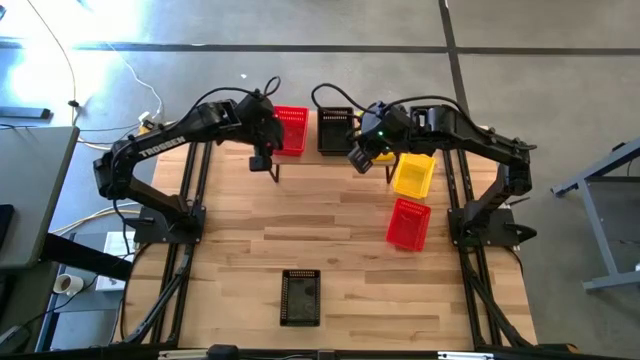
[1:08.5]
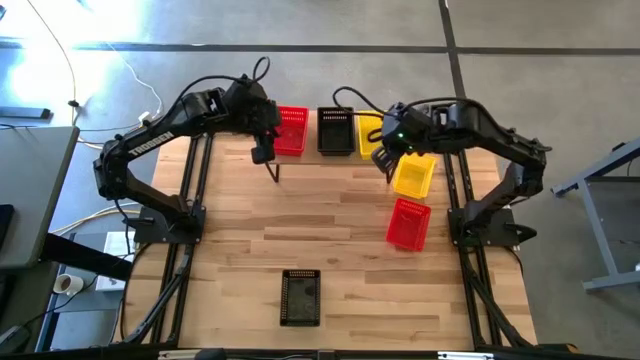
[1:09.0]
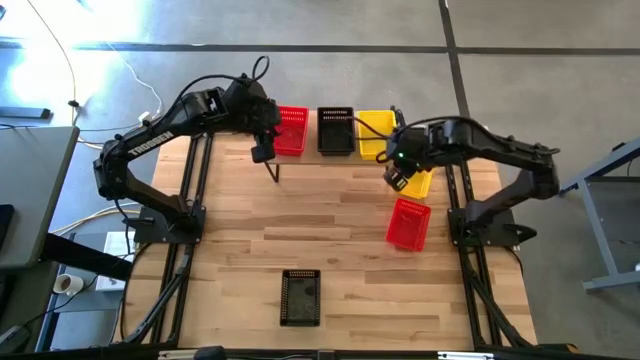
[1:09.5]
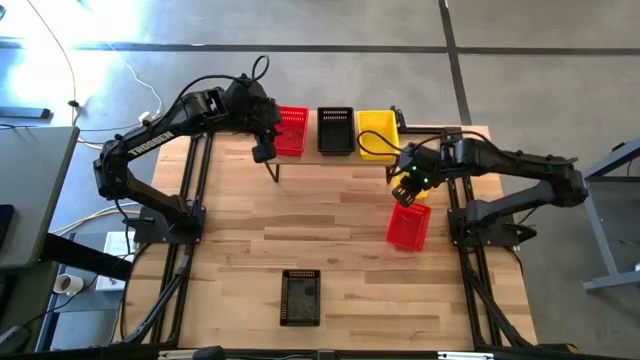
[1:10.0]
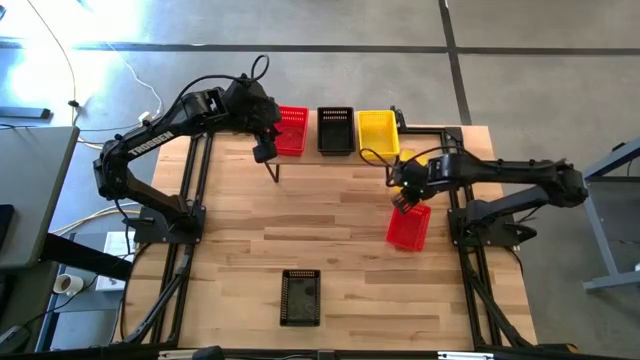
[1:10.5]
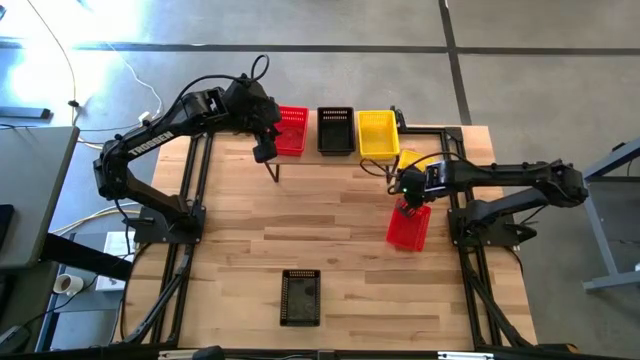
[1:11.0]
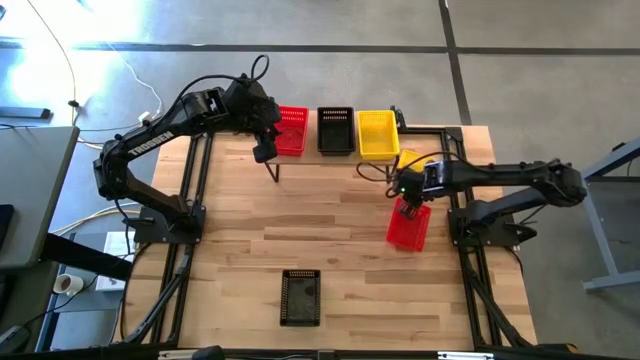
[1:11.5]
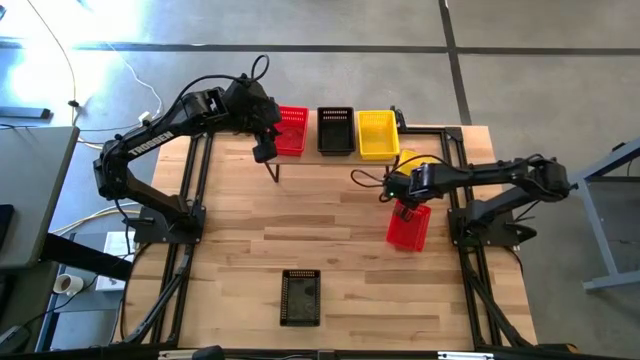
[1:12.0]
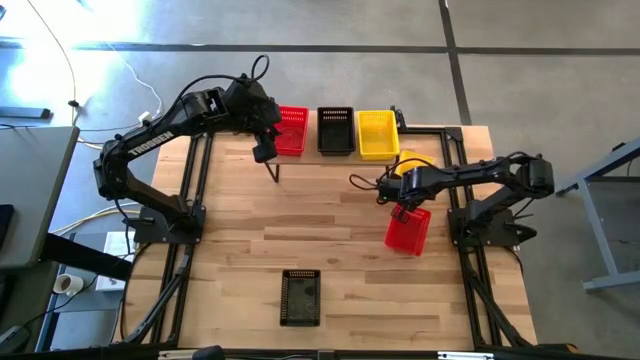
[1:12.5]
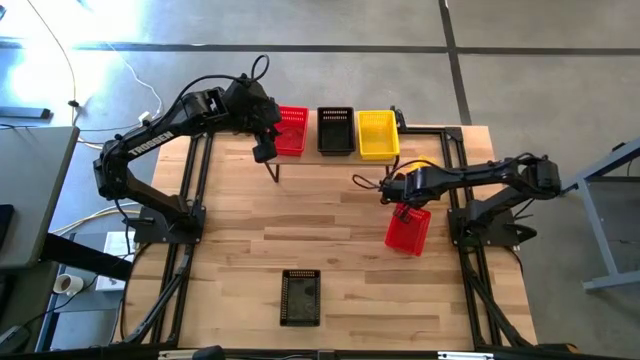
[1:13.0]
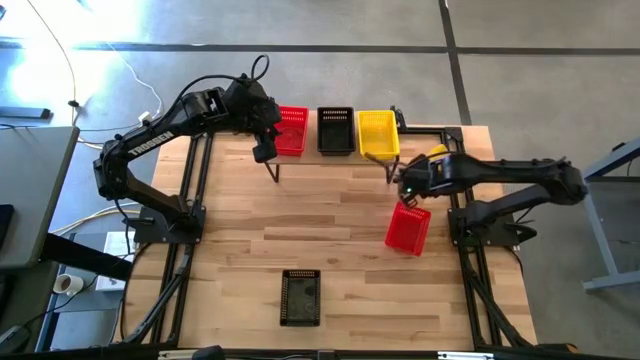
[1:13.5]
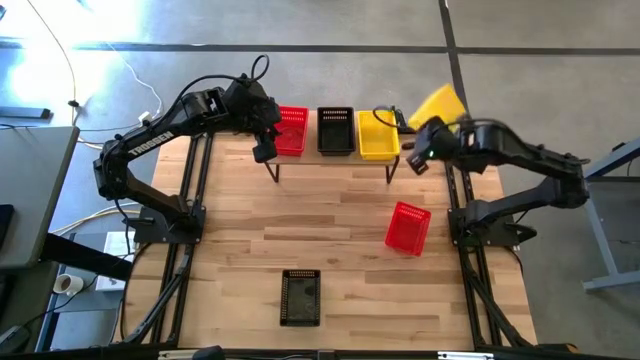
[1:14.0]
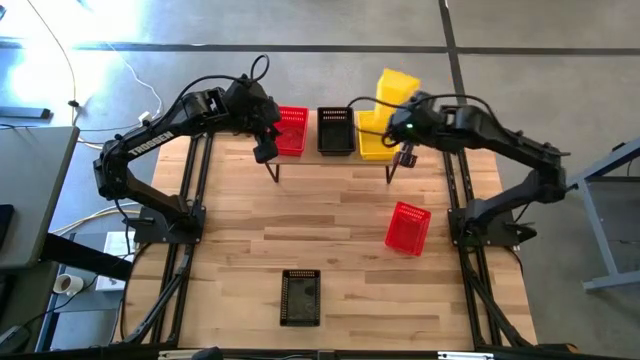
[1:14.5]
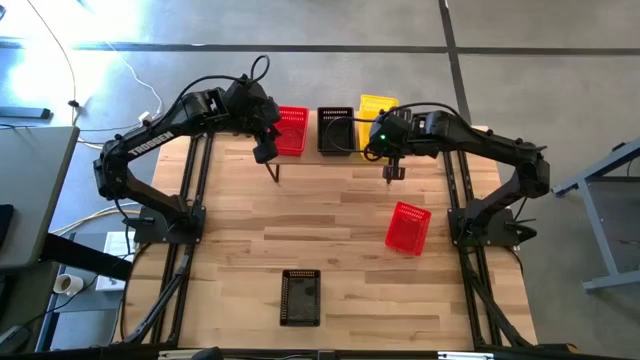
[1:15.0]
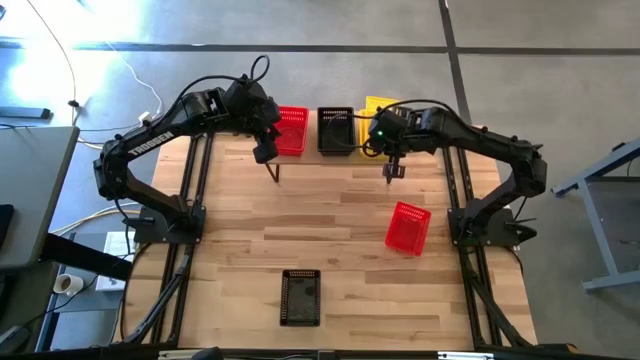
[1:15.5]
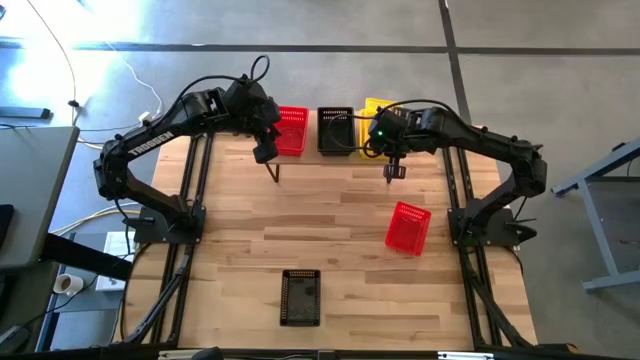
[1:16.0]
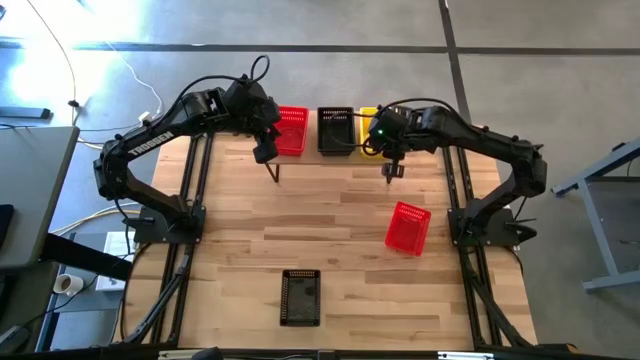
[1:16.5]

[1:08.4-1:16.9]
Task: Stack baskets on shelf by color
Stack the yellow bin on the top of the yellow bin on the shelf

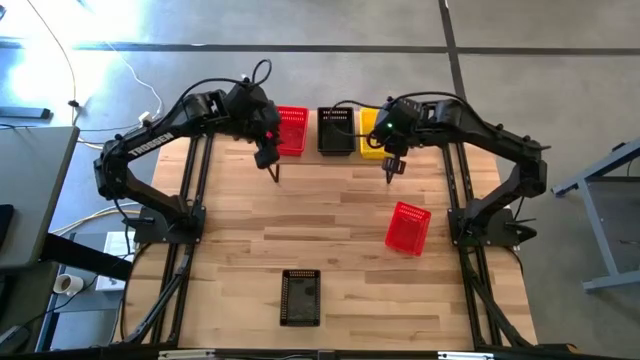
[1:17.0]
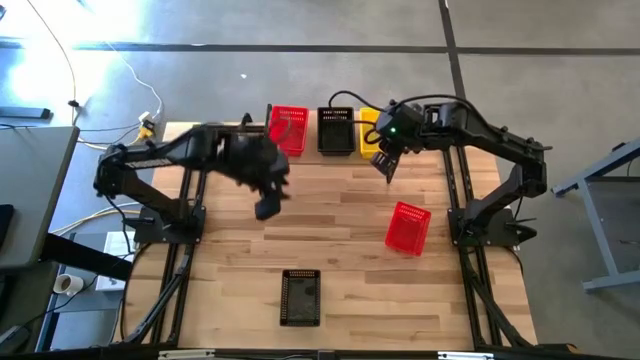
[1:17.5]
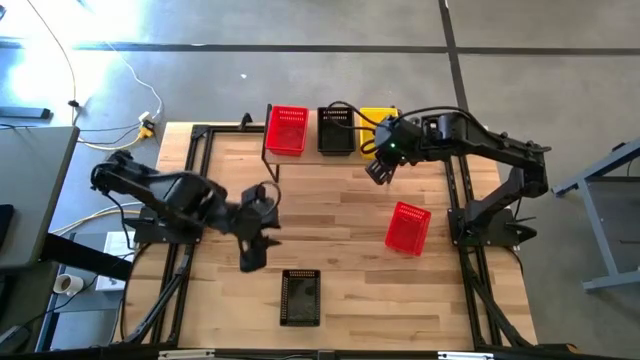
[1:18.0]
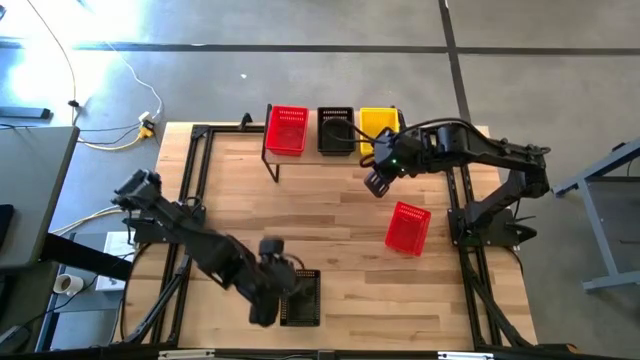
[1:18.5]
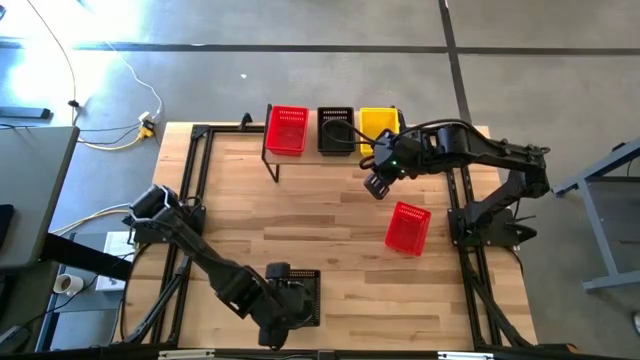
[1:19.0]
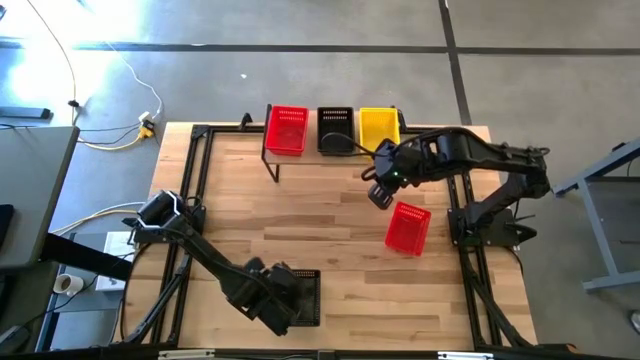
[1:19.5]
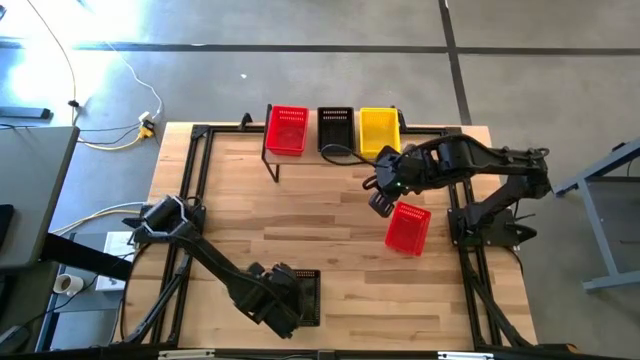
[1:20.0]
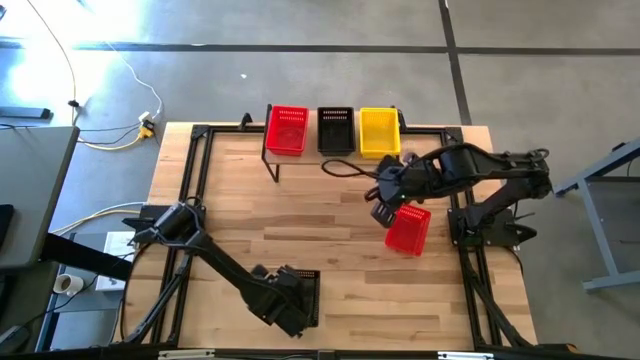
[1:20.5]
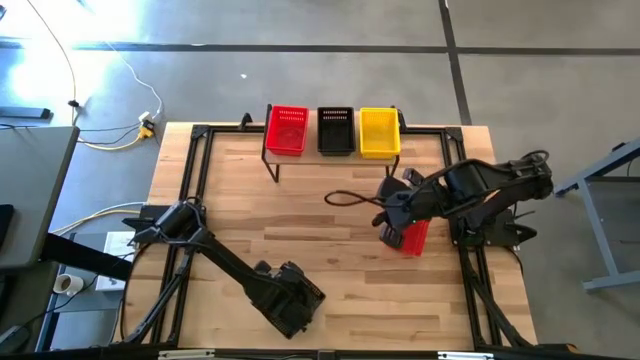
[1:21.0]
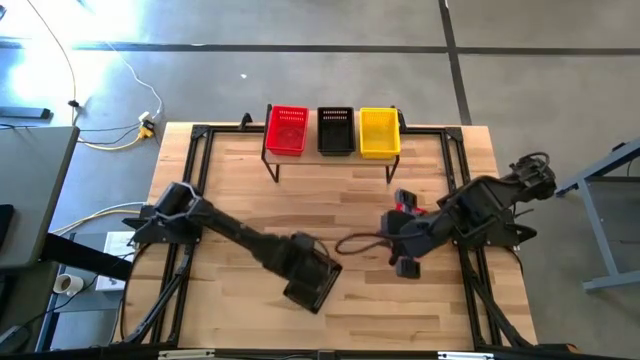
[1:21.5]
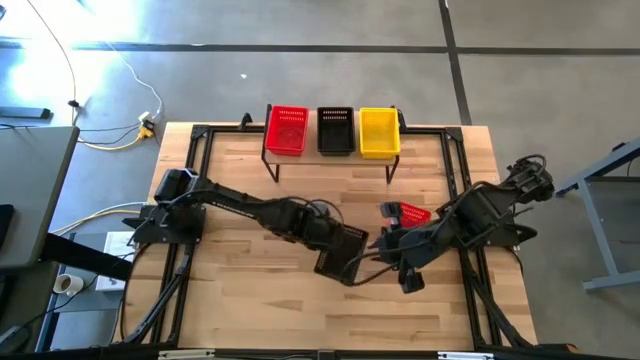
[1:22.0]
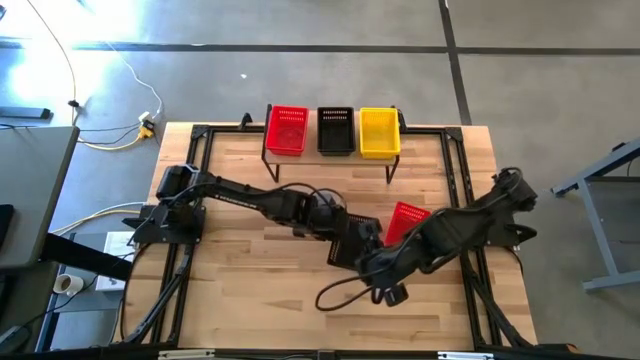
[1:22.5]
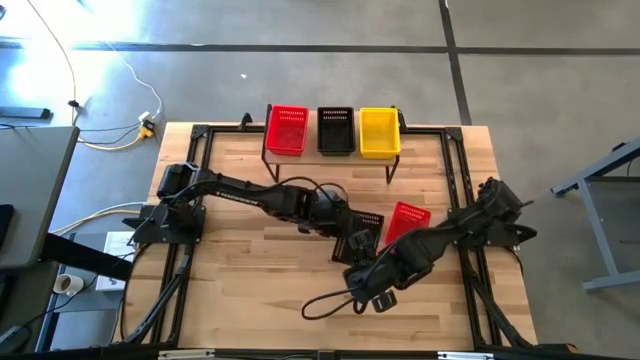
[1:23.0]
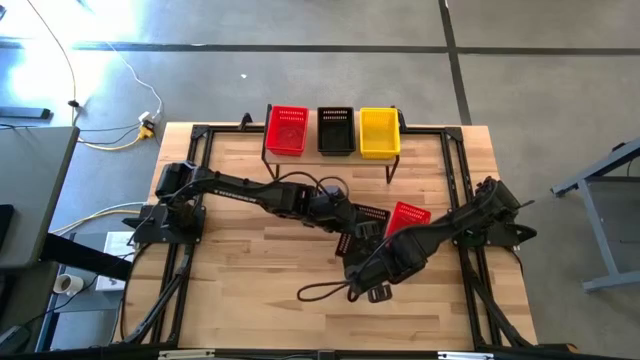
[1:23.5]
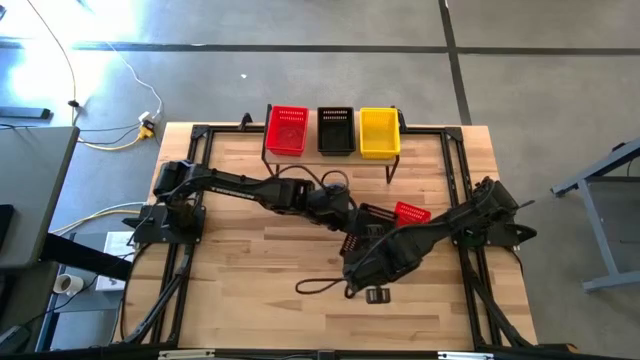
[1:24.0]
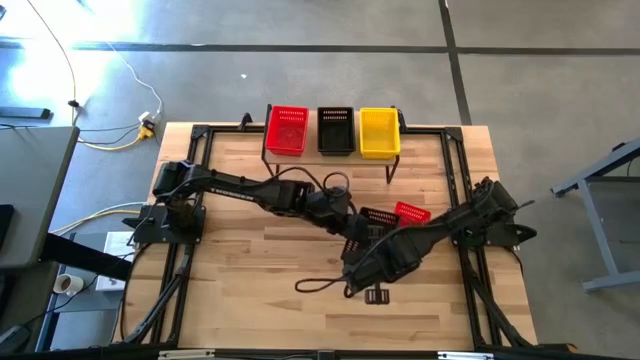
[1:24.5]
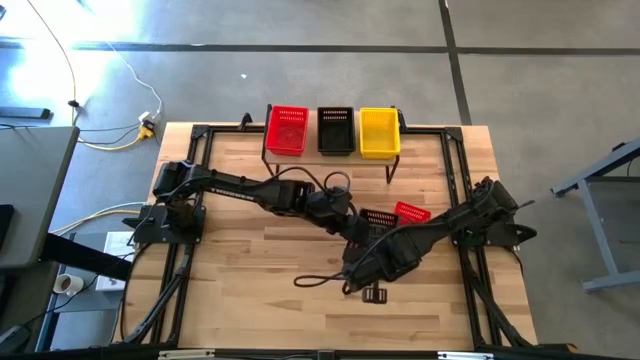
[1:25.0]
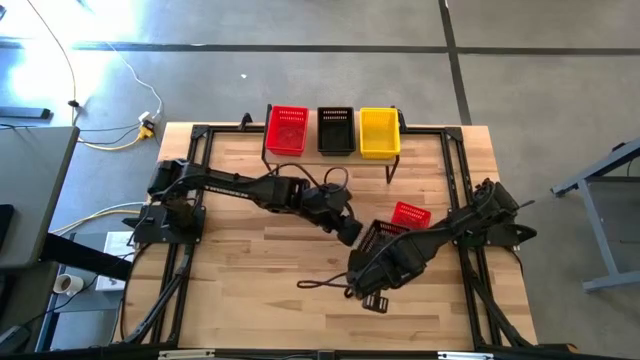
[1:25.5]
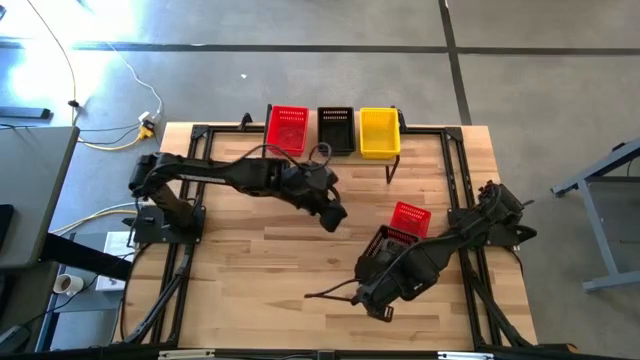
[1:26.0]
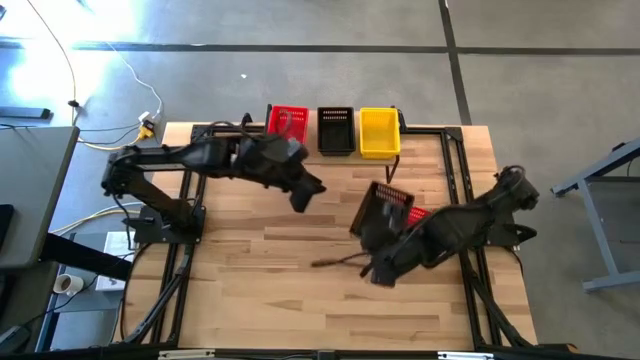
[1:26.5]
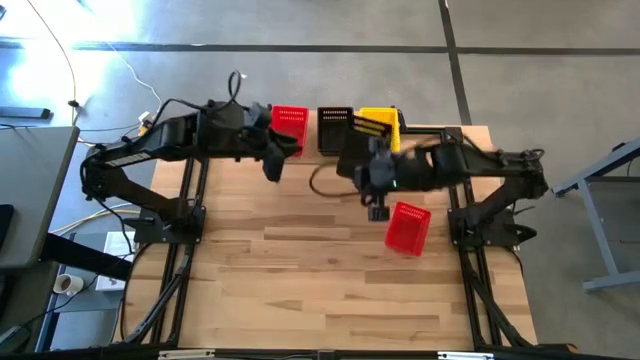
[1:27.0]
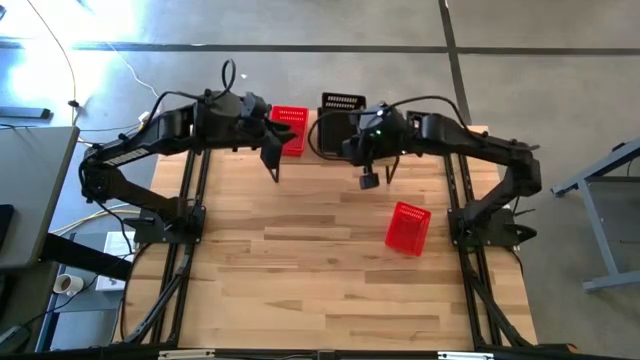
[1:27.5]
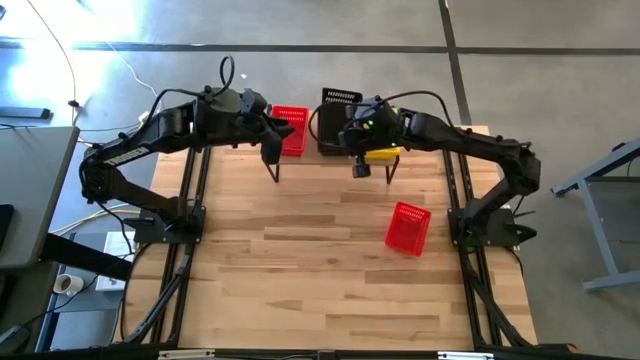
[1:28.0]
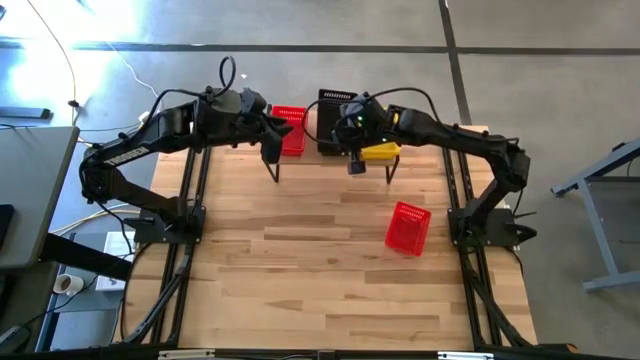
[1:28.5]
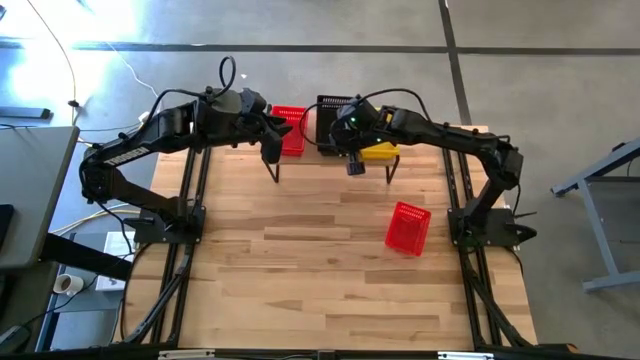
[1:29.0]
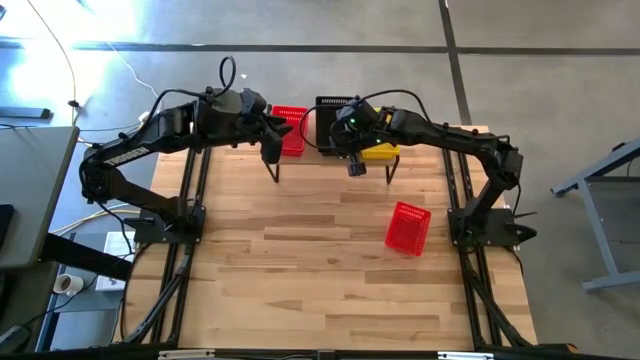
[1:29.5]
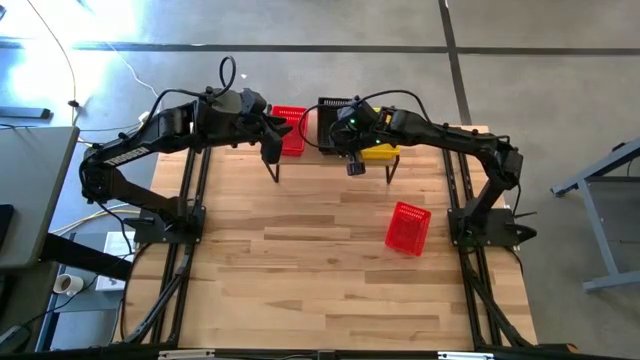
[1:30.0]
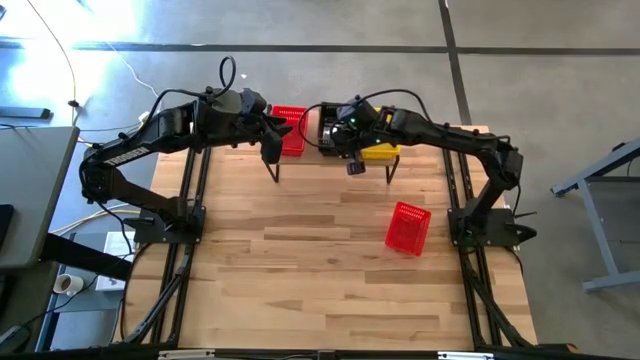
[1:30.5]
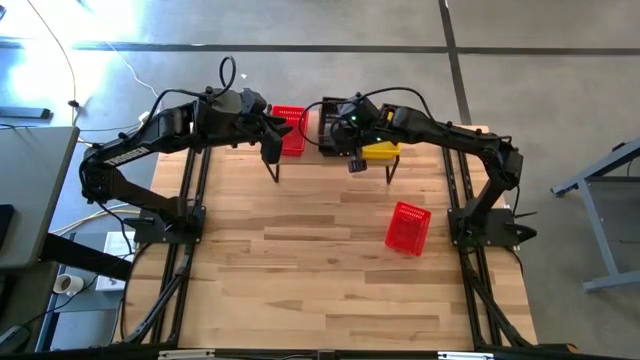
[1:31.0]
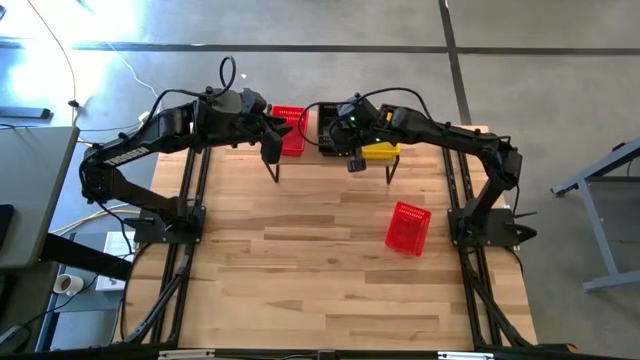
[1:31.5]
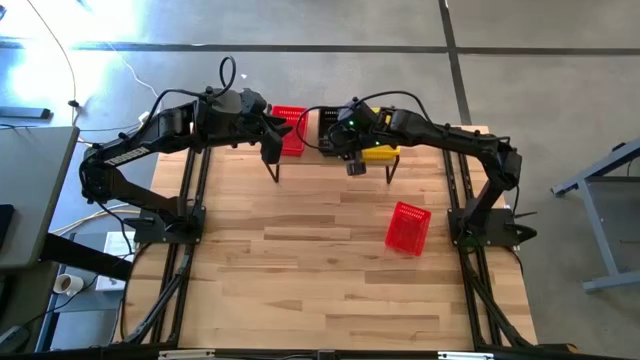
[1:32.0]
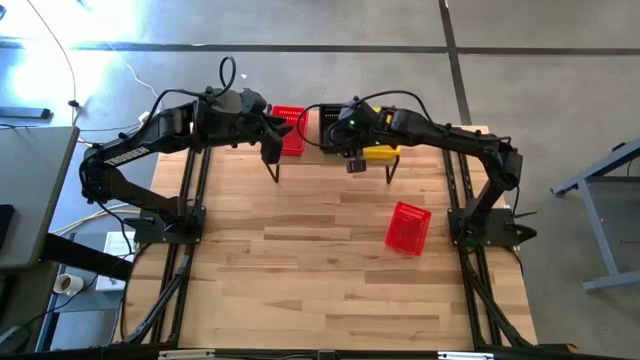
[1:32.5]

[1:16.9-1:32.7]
Stack the black bin on the top of the black bin on the shelf
